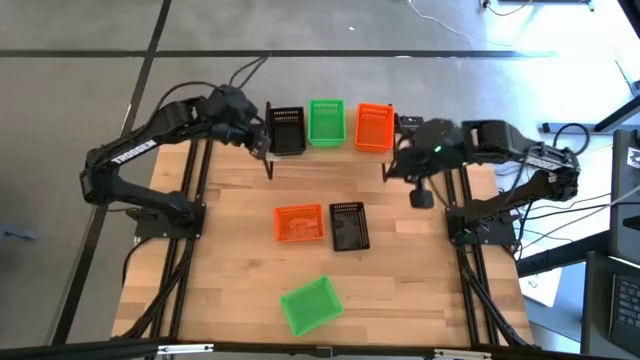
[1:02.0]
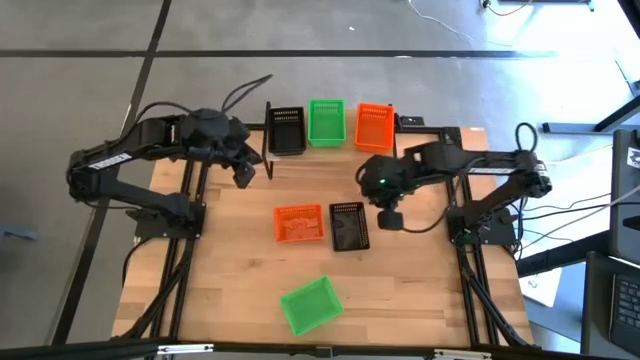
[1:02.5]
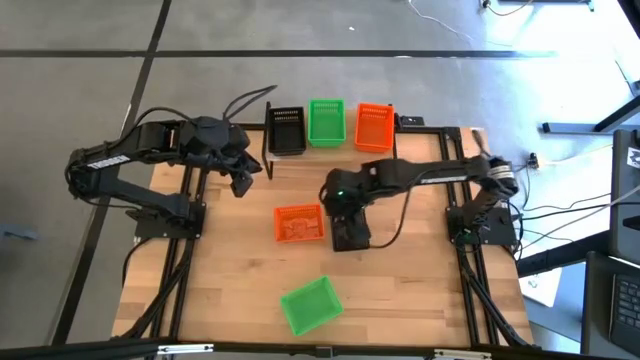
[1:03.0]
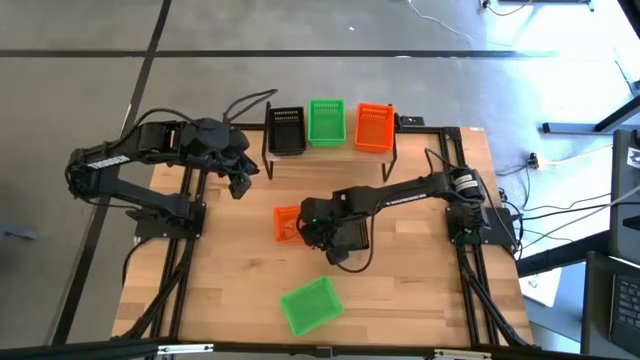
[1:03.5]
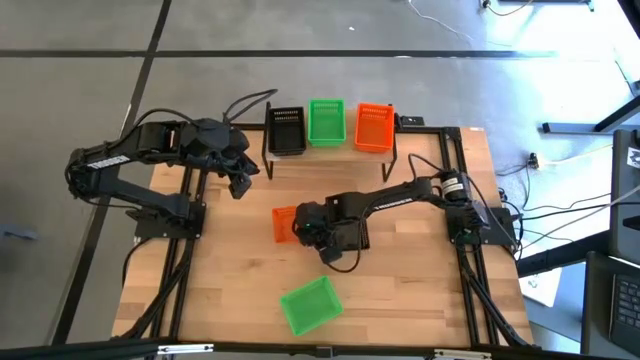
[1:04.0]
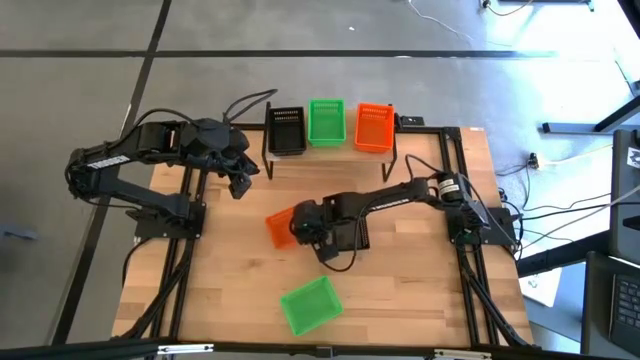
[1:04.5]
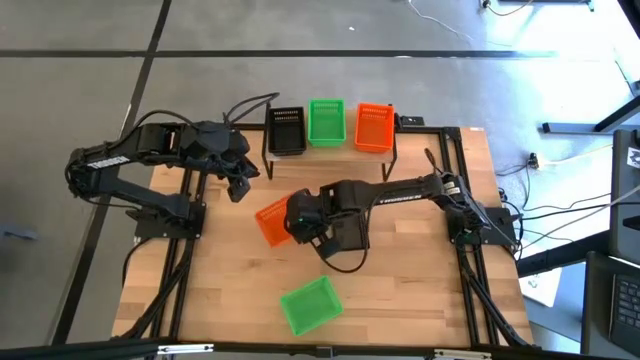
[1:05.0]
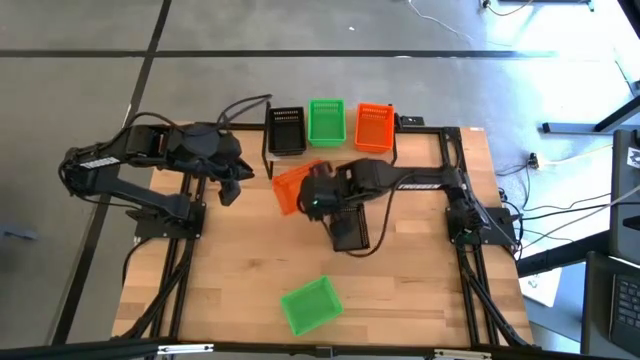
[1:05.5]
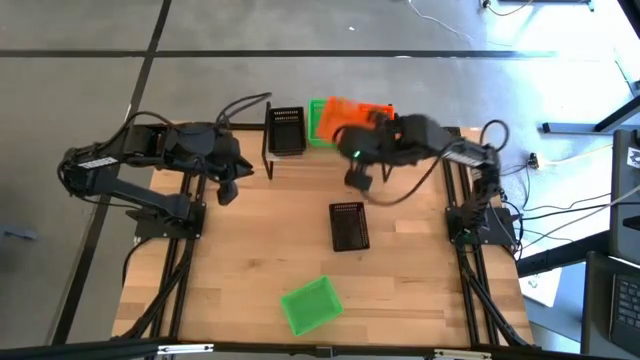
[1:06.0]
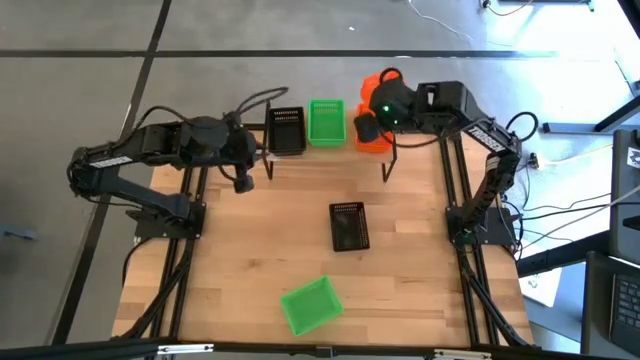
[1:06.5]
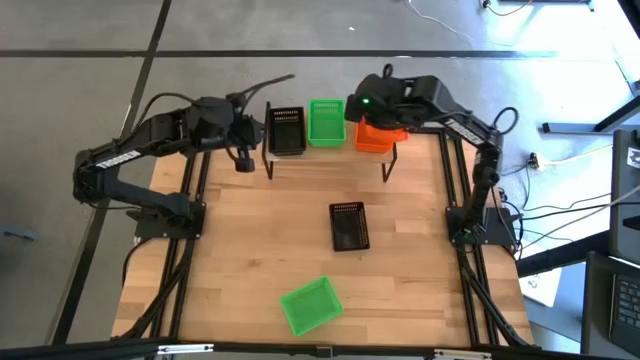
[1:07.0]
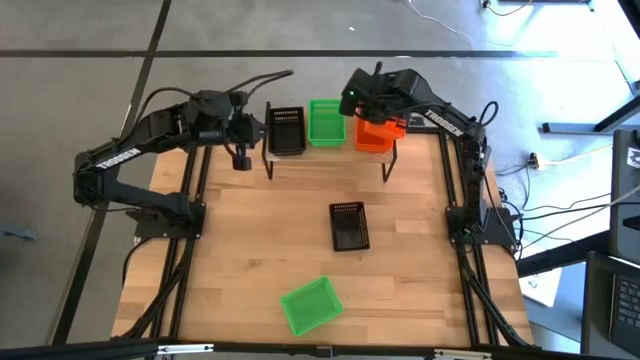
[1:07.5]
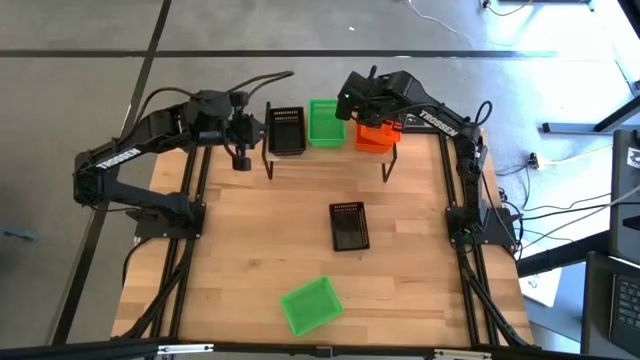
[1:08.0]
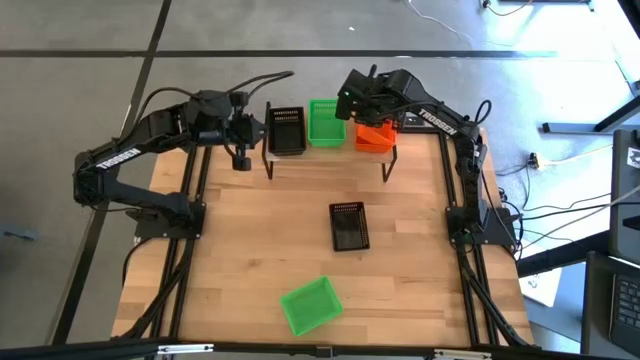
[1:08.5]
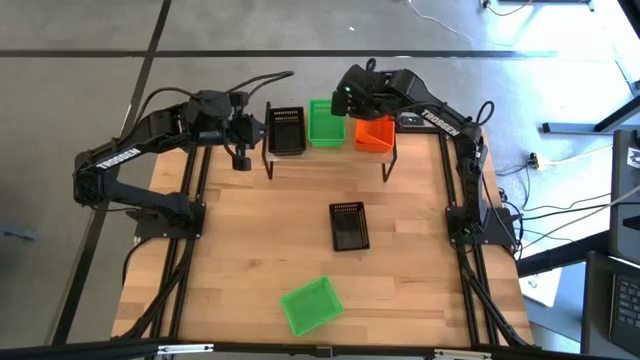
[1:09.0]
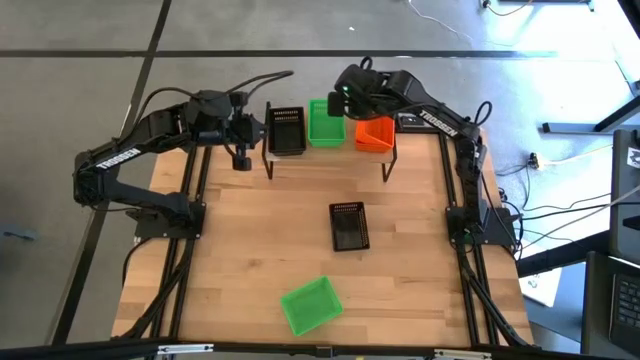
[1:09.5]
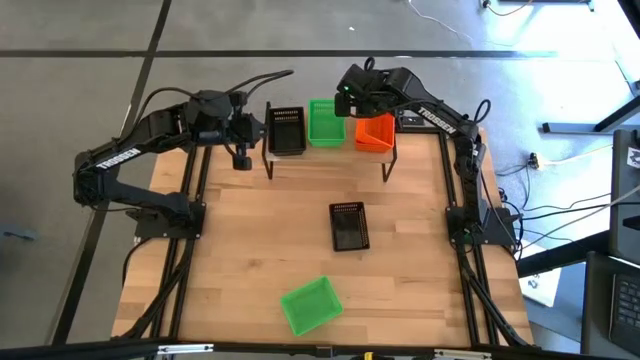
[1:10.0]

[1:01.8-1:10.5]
Task: Stack baskets on shelf by color
Stack the orange bin on top of the other bins on the shelf

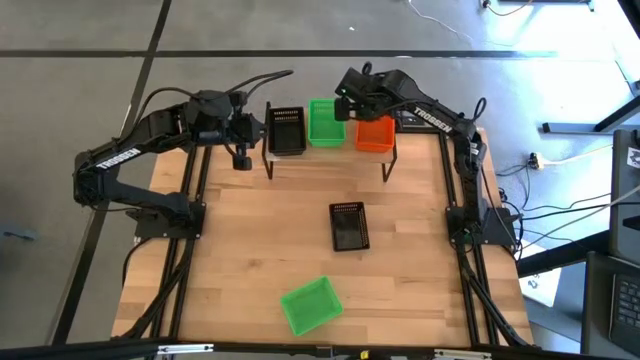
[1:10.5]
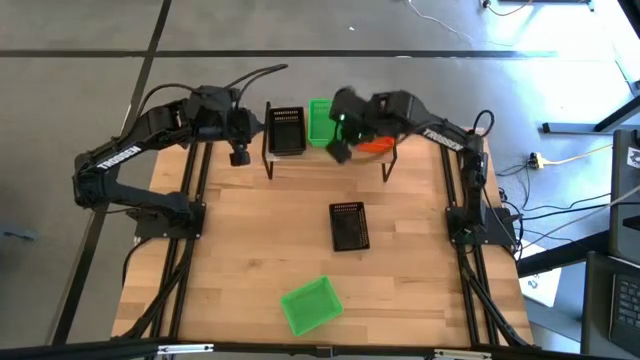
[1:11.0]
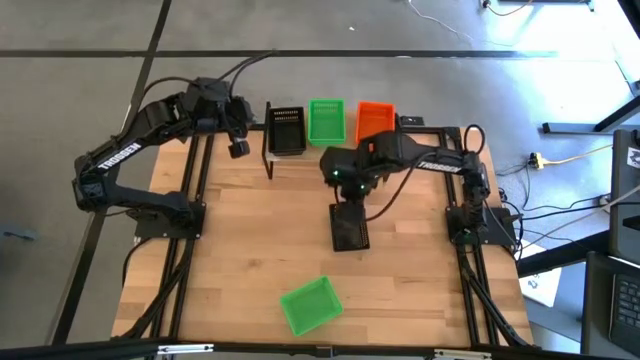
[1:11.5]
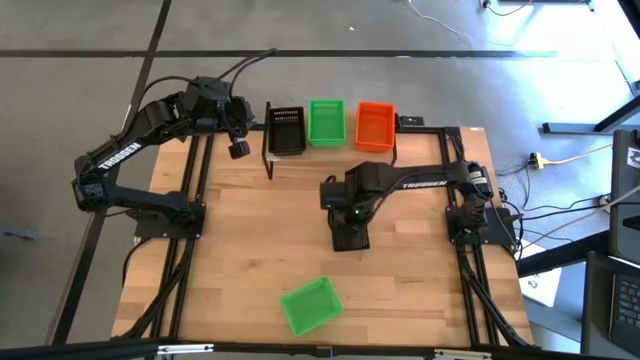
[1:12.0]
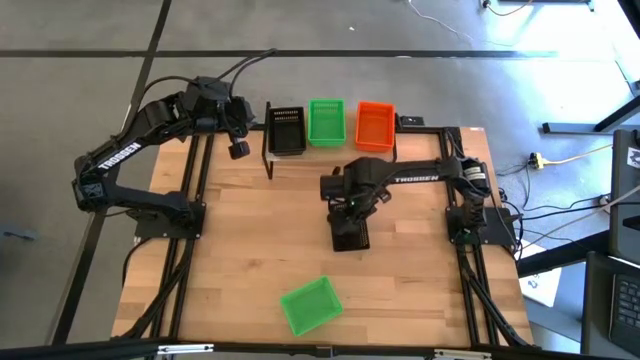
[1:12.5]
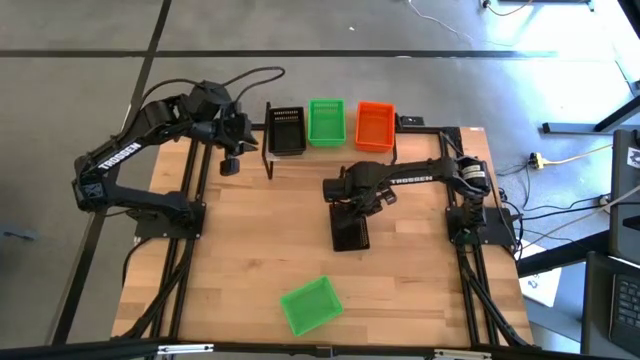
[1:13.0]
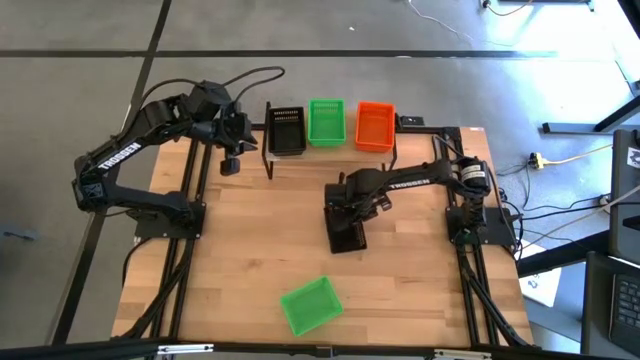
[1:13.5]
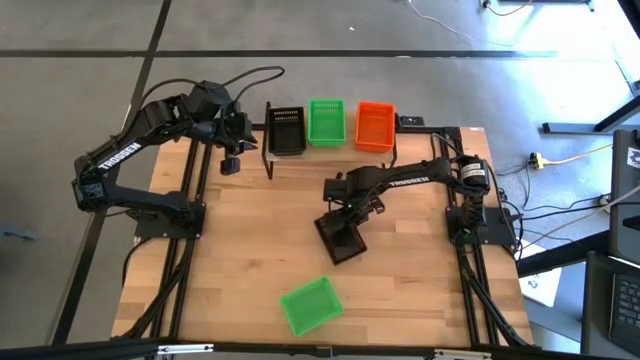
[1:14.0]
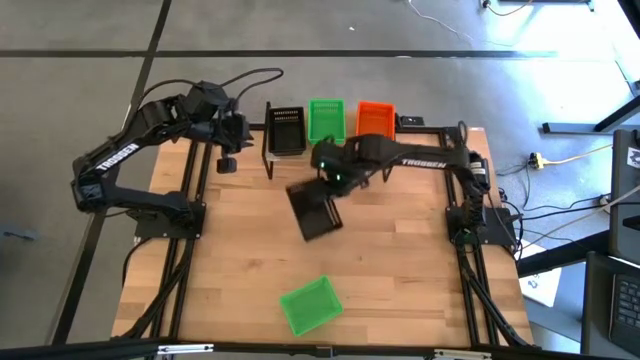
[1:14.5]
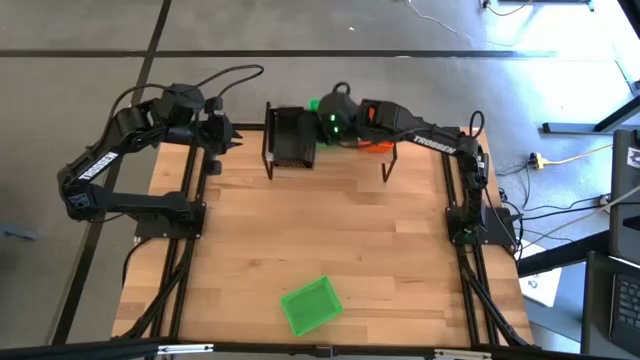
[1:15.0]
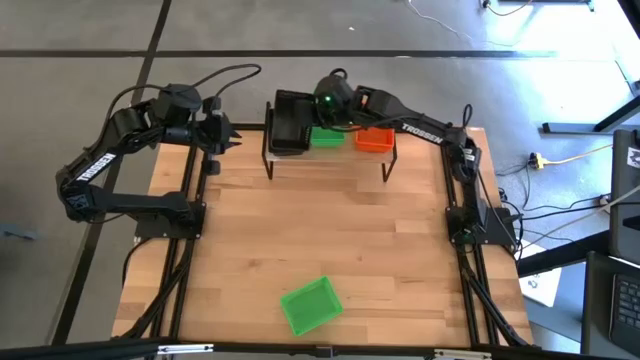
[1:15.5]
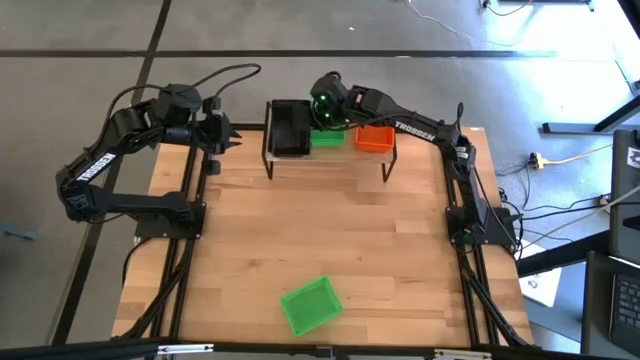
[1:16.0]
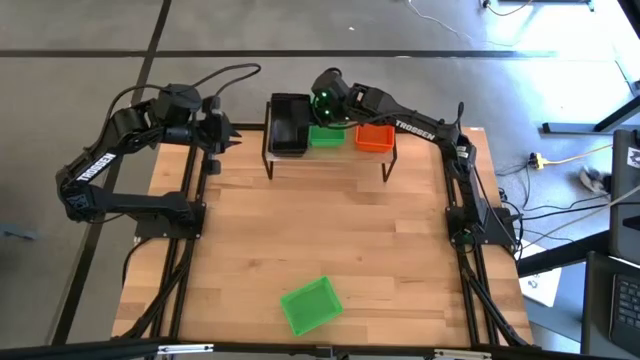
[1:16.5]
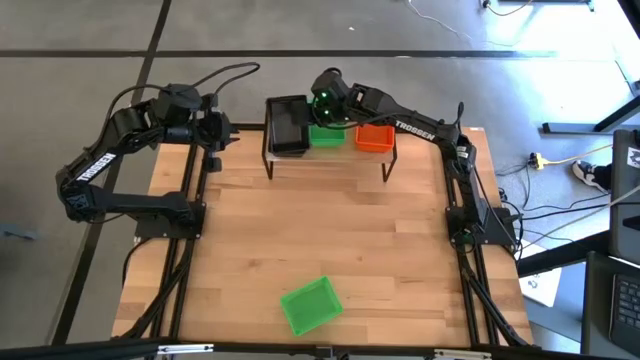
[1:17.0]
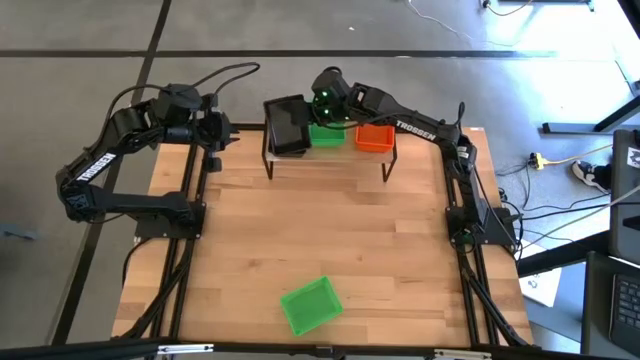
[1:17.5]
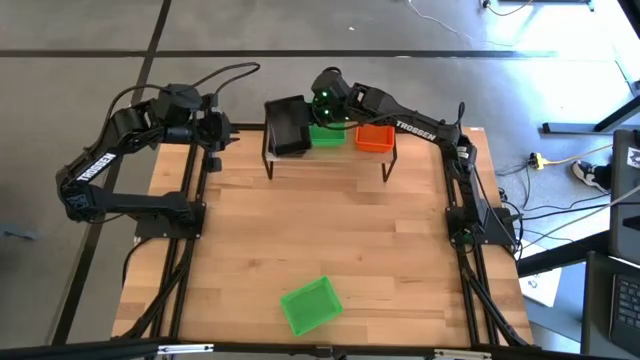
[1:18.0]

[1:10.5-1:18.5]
Stack the black bin on top of the other bins on the shelf

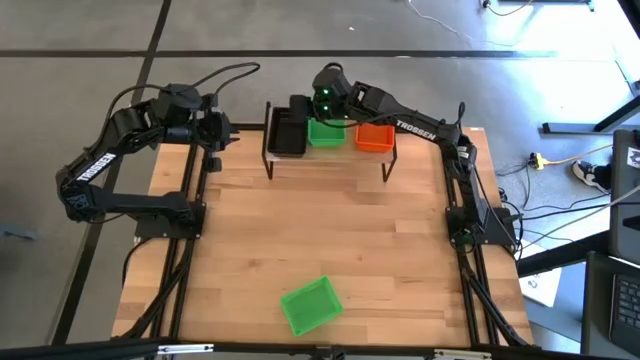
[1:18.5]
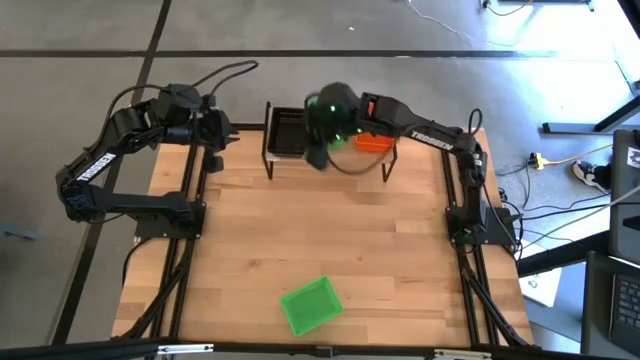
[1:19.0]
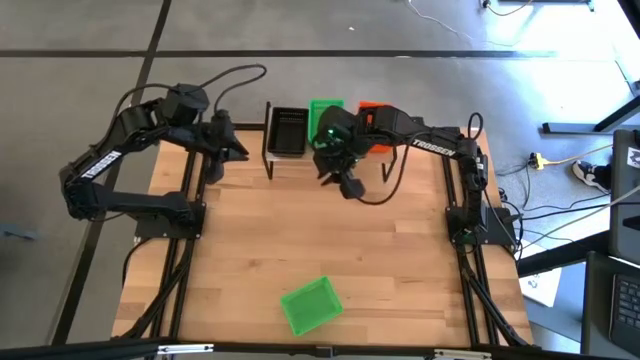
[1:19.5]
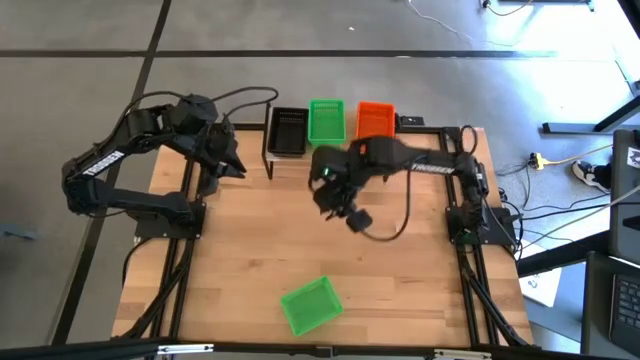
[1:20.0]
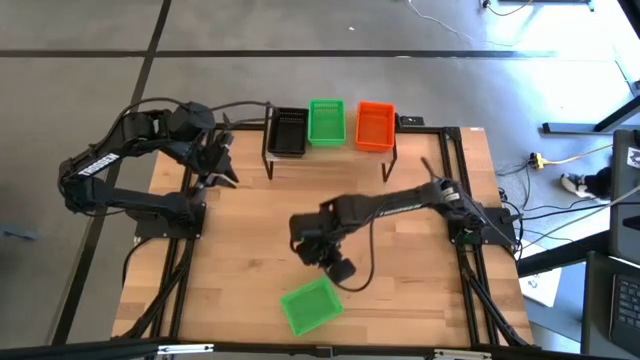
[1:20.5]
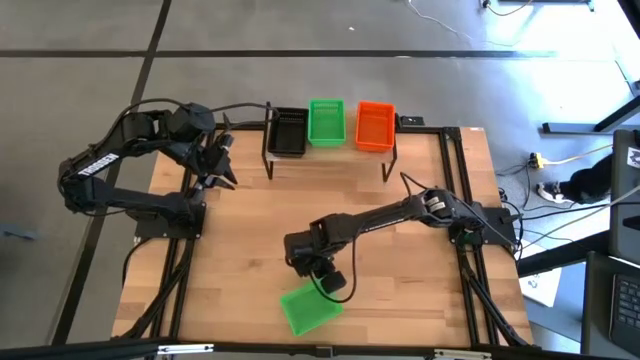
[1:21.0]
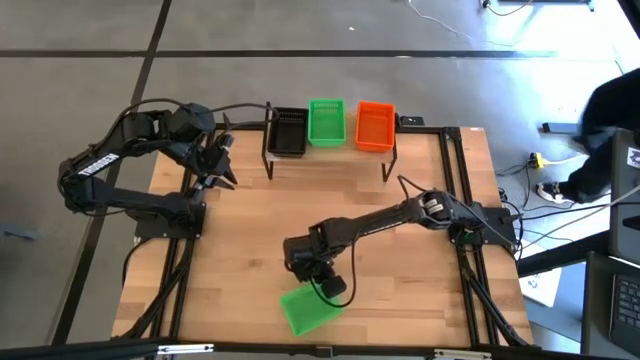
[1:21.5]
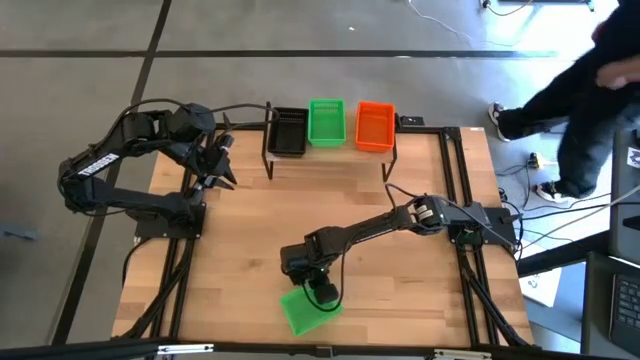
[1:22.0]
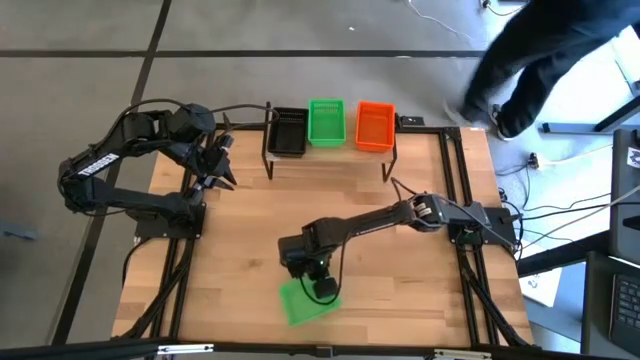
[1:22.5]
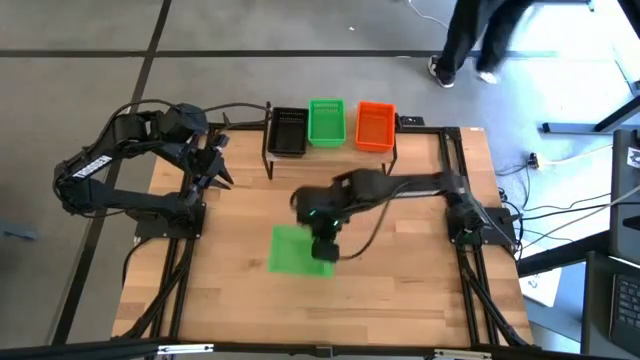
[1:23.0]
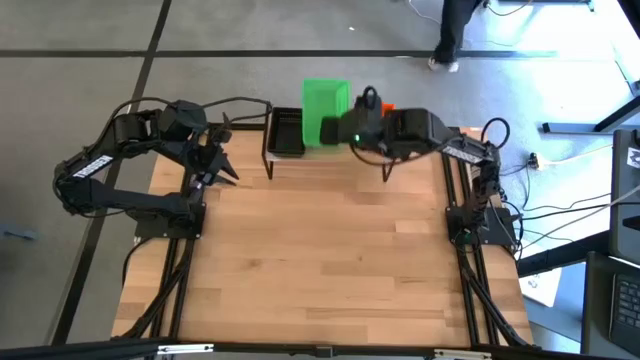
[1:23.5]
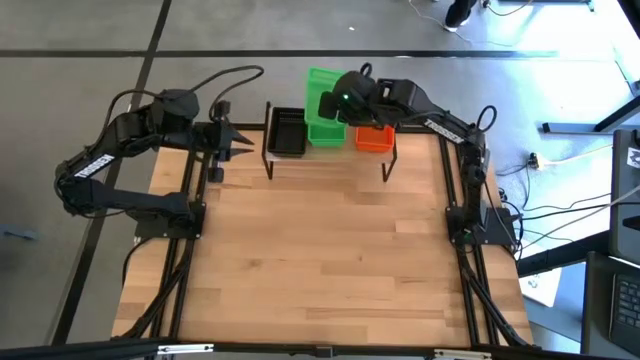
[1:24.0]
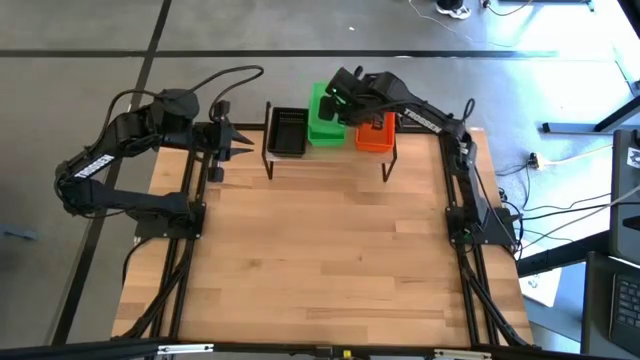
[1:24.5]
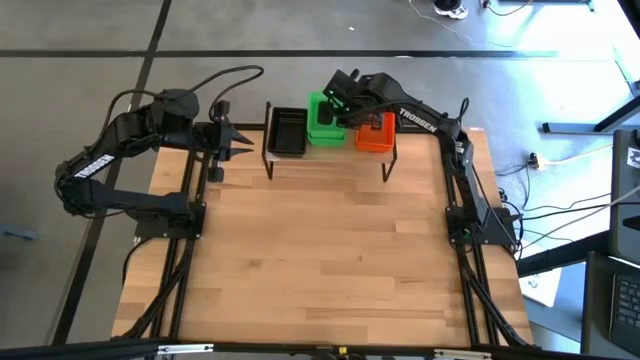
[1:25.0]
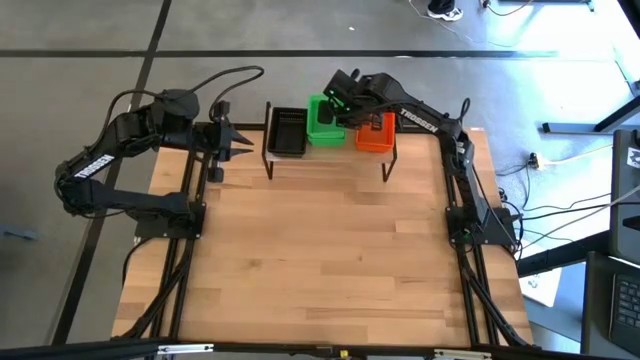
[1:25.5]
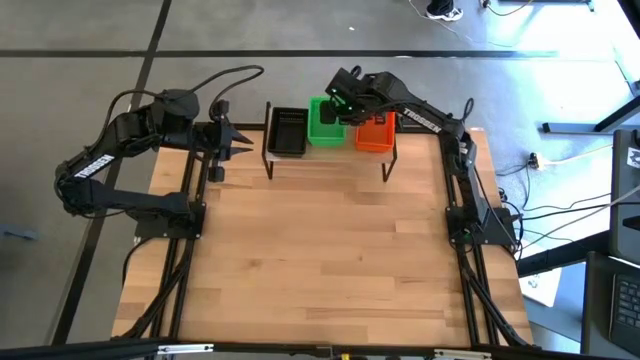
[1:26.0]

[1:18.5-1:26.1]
Stack the green bin on top of the other bins on the shelf
